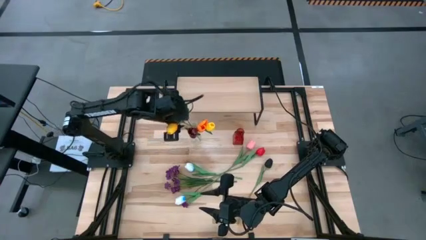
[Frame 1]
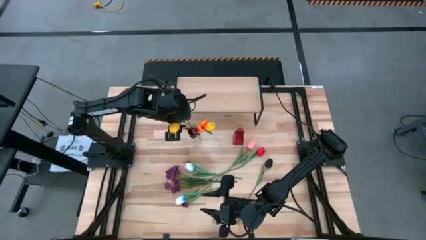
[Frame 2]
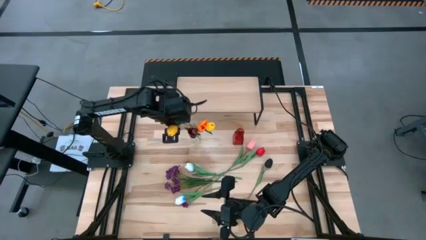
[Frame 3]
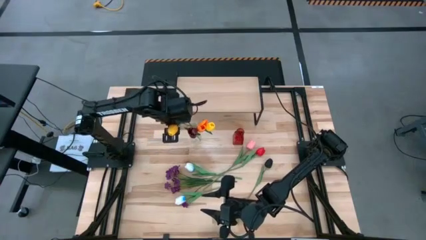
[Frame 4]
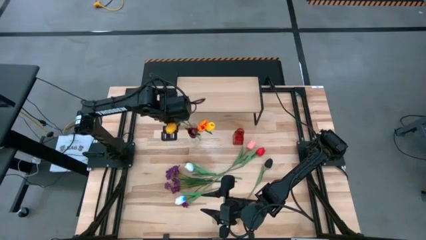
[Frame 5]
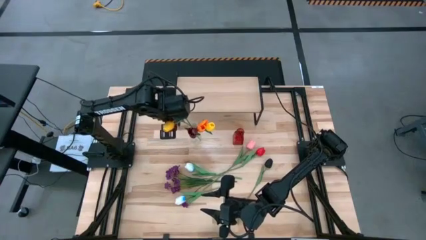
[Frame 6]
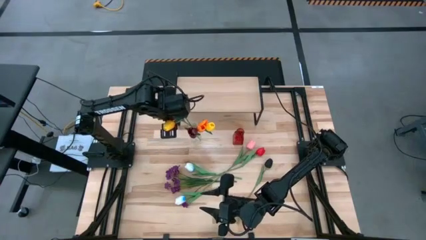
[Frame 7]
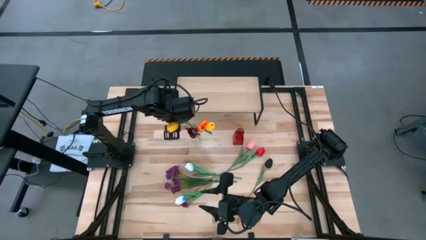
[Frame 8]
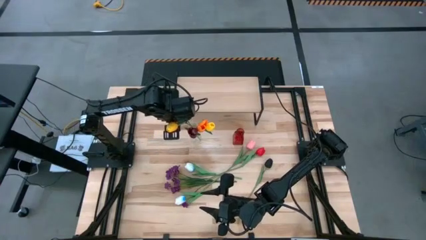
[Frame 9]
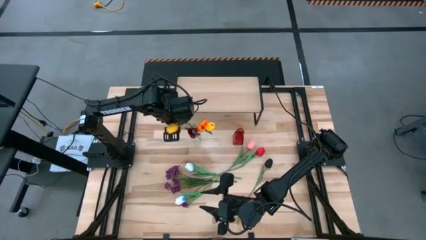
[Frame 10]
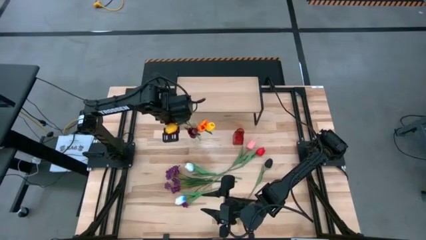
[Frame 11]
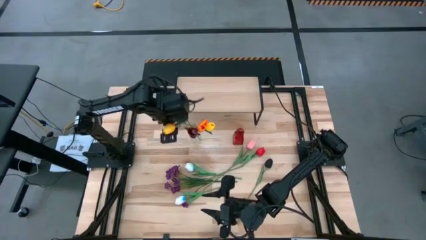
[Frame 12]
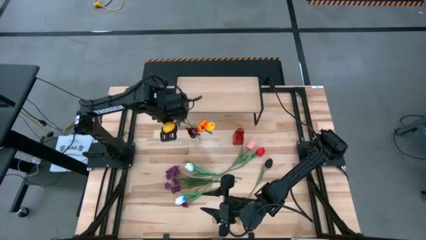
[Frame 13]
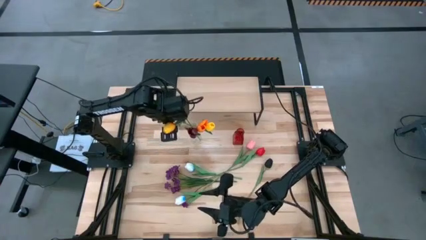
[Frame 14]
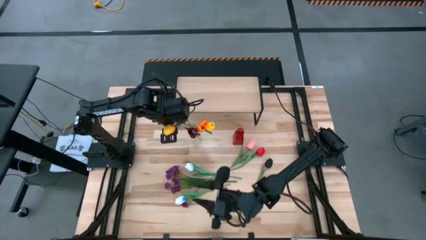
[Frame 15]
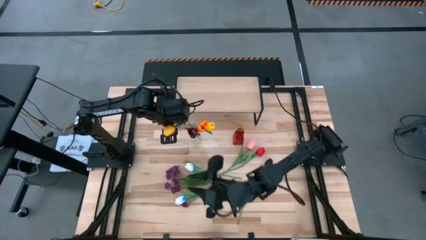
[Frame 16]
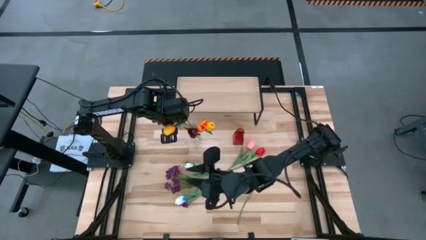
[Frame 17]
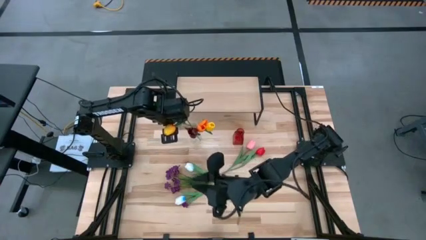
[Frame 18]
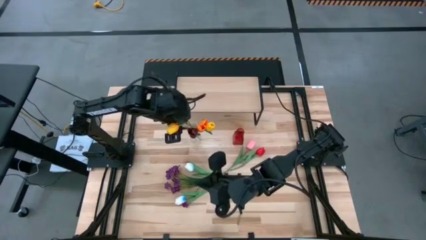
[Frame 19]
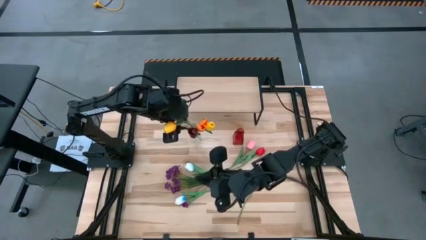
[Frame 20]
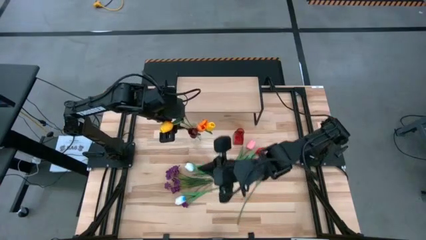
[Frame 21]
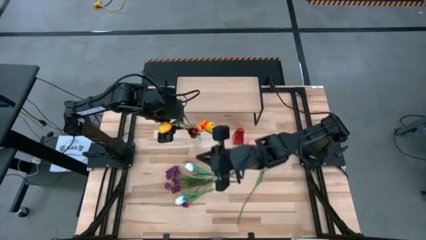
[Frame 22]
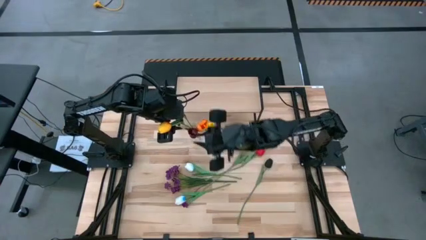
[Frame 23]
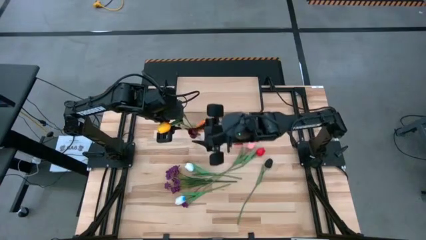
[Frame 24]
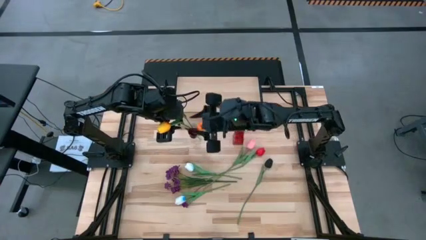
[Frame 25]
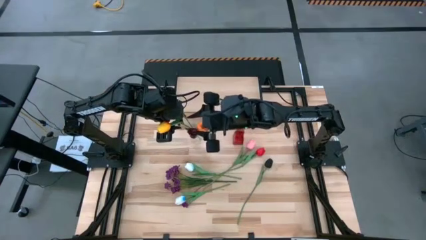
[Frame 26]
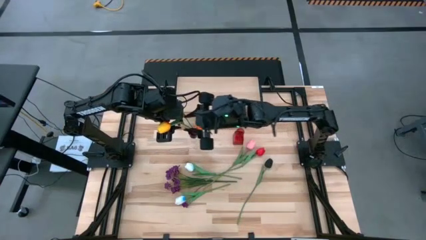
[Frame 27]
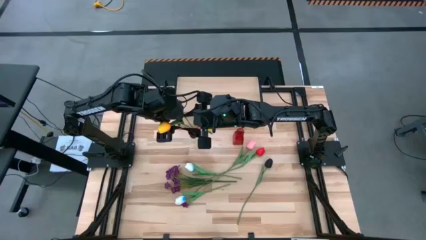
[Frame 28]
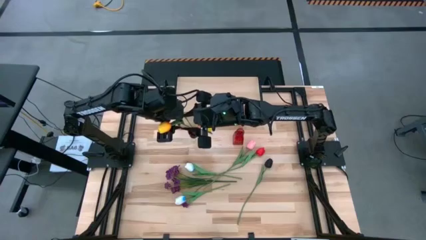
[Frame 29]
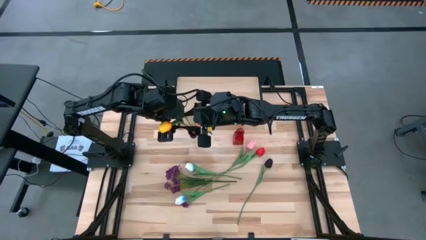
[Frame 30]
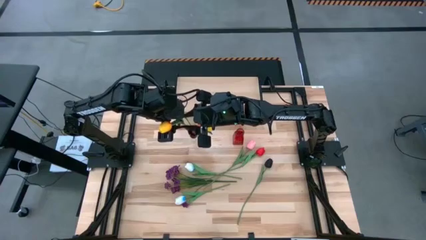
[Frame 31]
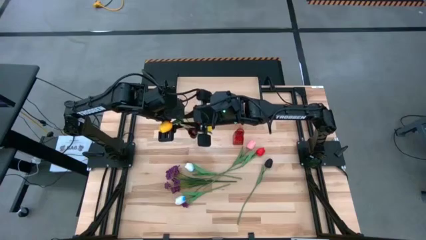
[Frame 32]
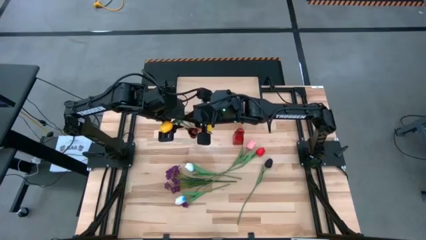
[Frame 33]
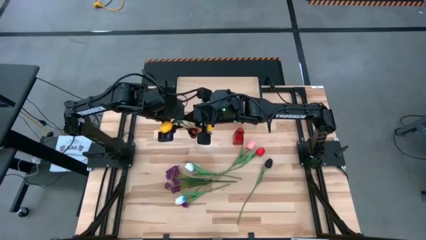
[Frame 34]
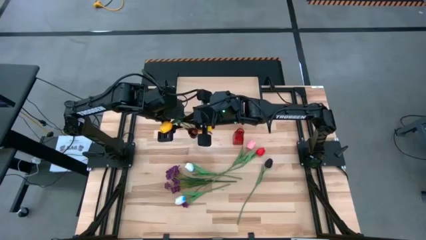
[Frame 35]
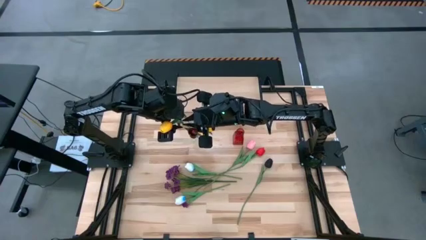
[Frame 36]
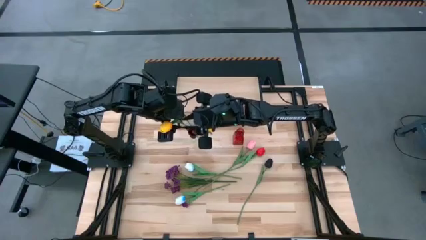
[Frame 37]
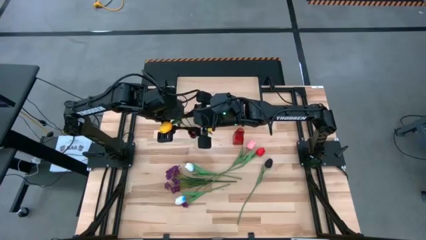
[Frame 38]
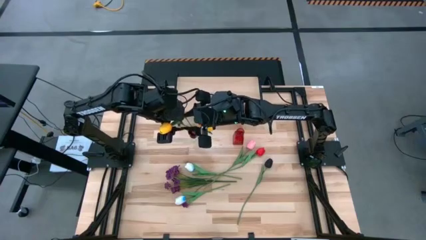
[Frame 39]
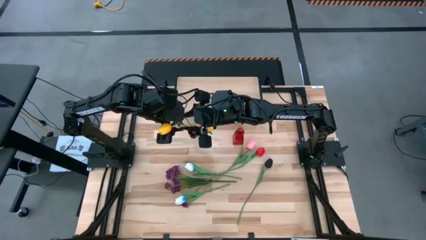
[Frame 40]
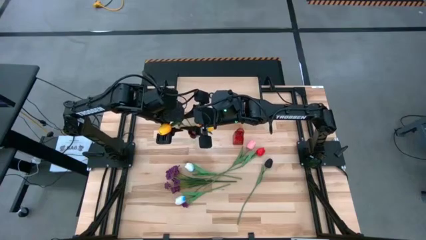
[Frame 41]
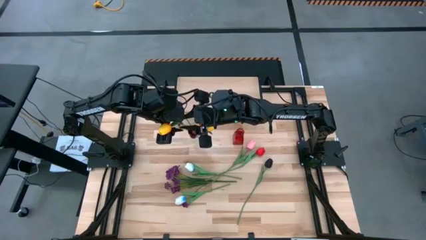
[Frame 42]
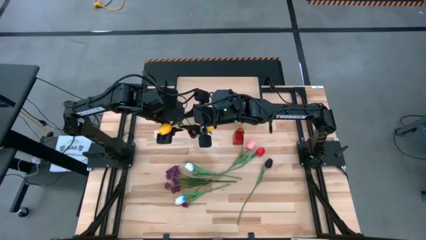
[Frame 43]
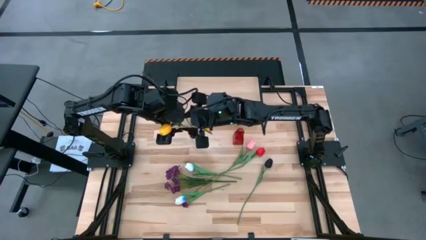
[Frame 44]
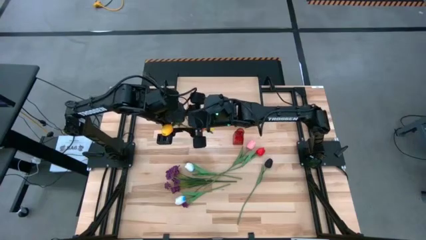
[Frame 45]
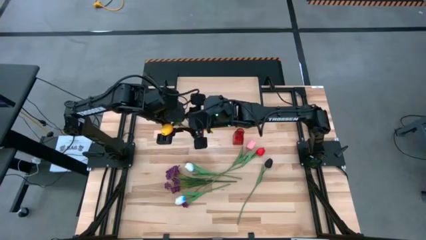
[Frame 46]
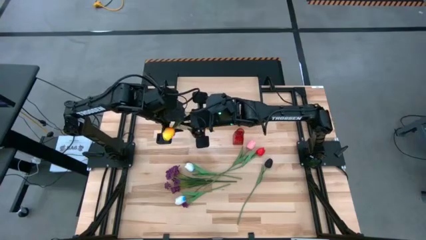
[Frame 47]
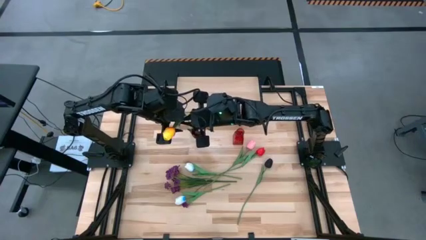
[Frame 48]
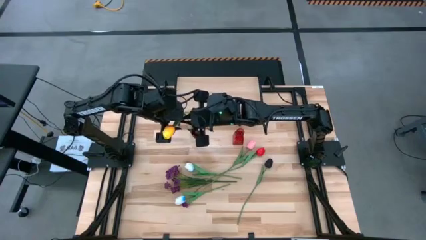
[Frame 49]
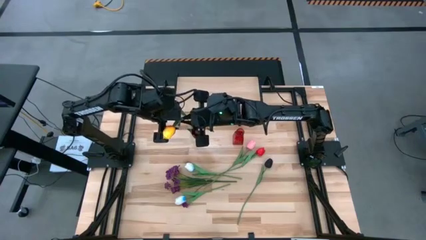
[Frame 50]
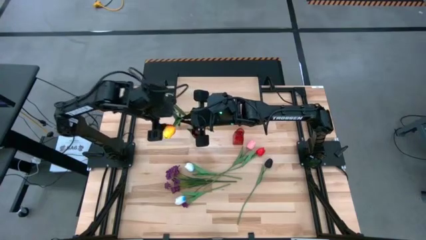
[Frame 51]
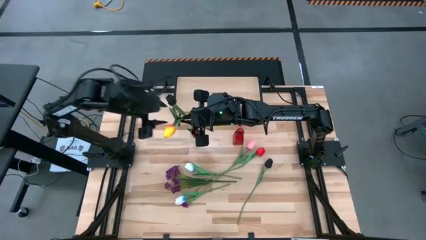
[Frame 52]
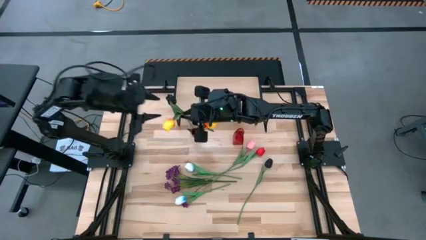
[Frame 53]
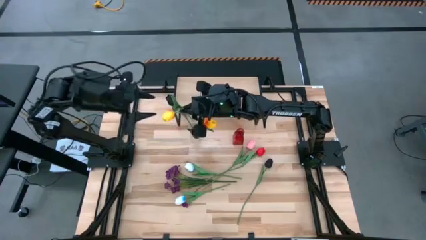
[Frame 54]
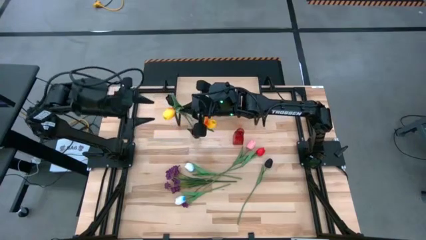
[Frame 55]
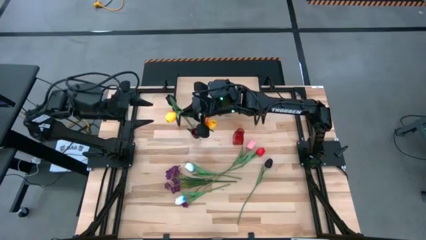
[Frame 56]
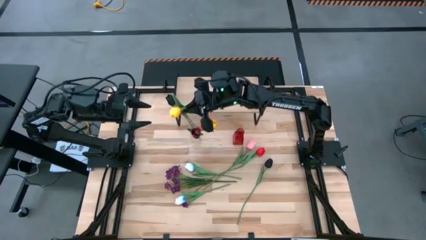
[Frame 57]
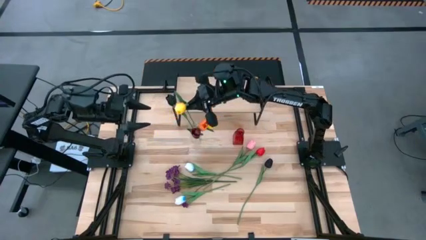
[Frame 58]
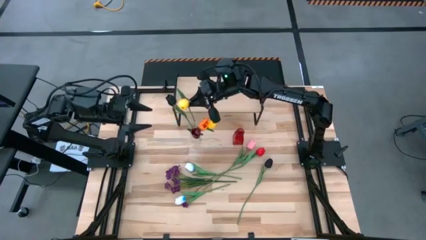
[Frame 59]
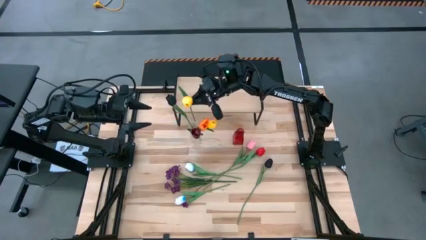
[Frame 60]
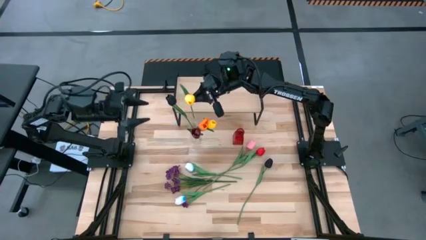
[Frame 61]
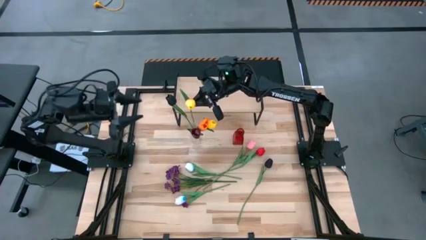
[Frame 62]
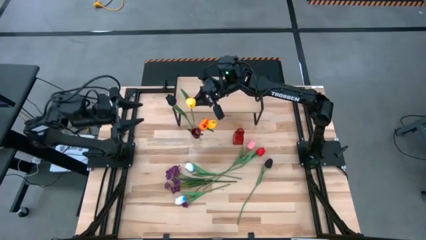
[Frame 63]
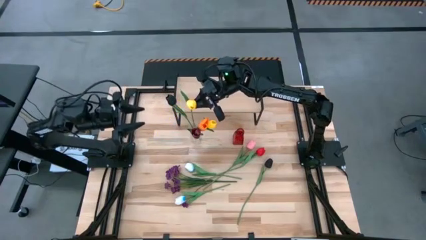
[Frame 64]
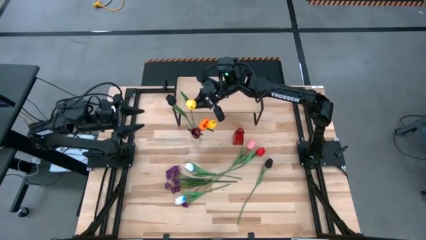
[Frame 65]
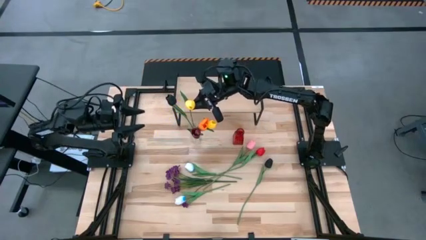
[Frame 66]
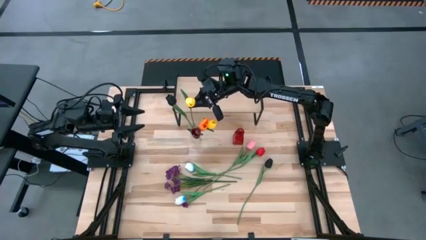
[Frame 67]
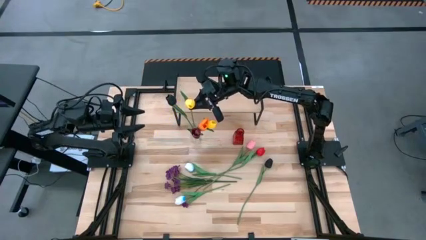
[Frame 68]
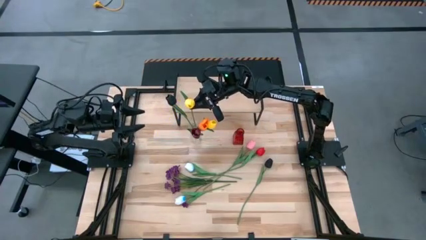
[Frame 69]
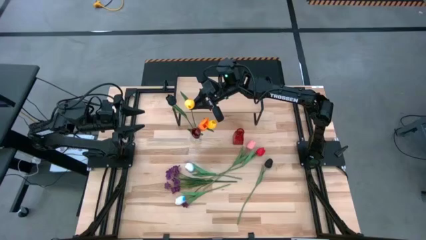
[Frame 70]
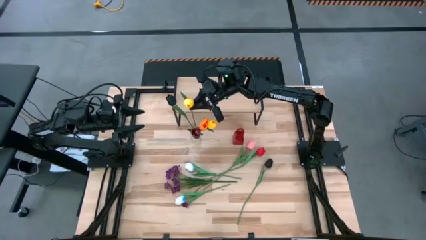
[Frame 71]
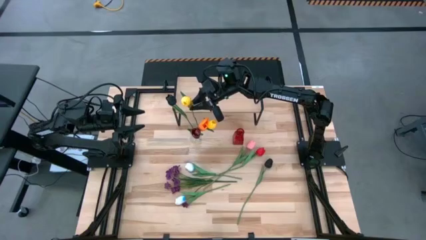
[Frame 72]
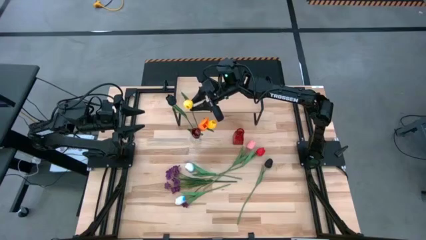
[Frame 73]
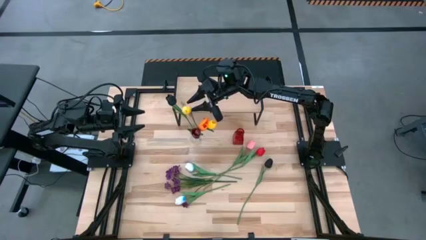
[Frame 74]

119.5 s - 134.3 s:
Task: Pick and place flowers into a vace then onto a shelf
Put the yellow tulip into the transparent vase

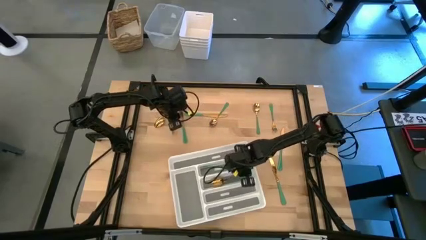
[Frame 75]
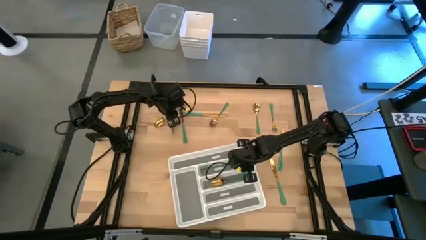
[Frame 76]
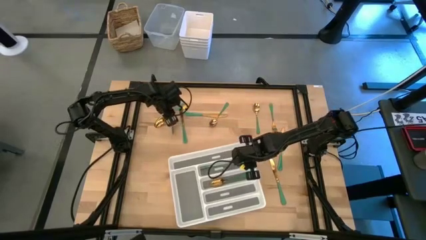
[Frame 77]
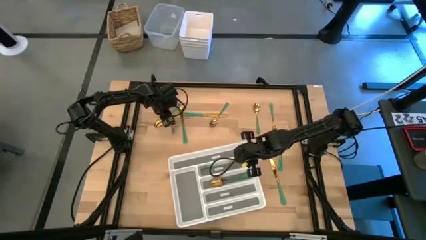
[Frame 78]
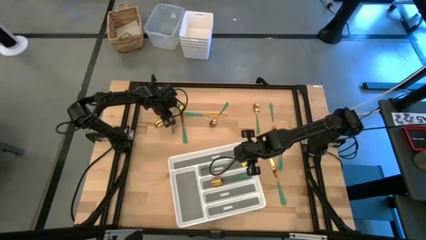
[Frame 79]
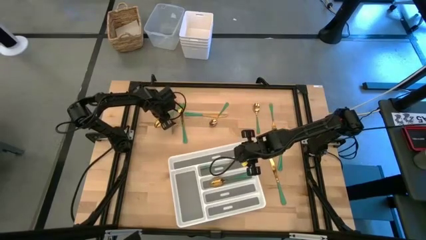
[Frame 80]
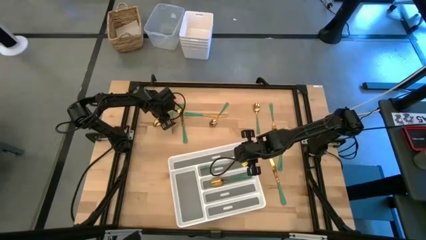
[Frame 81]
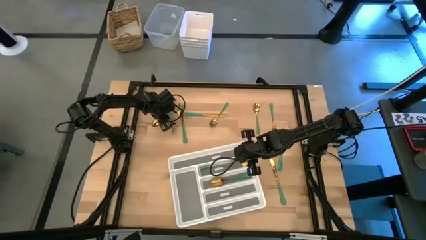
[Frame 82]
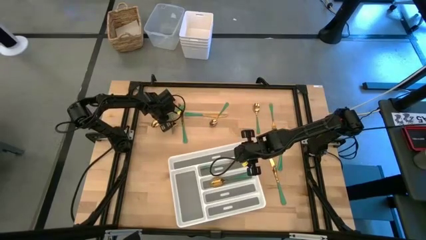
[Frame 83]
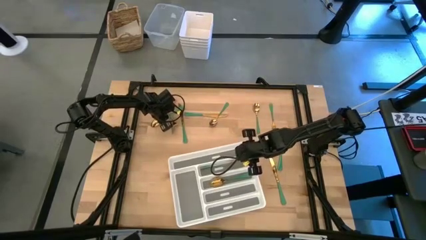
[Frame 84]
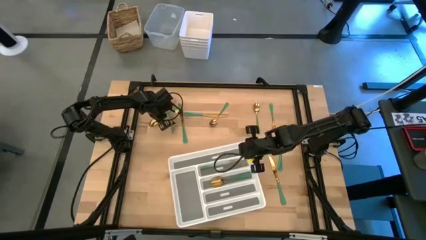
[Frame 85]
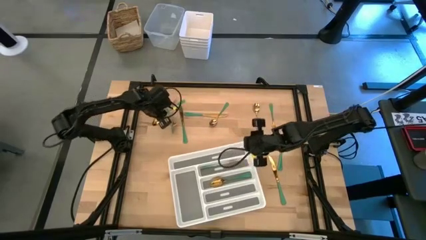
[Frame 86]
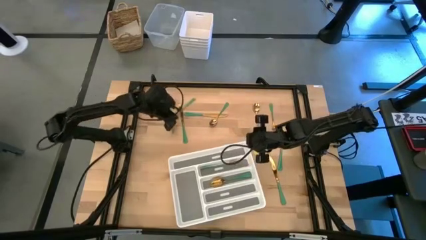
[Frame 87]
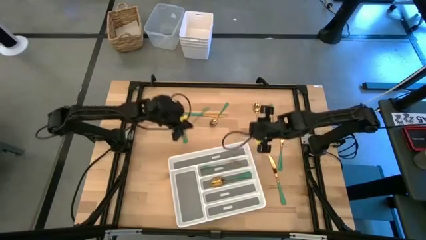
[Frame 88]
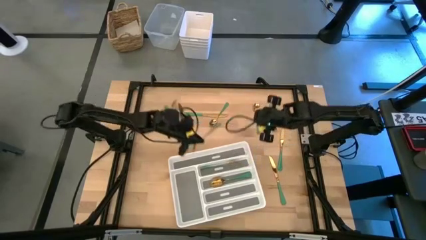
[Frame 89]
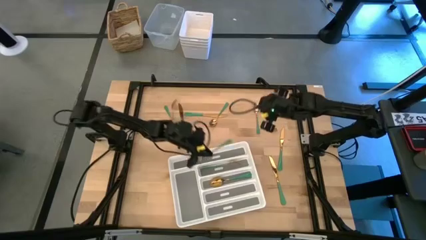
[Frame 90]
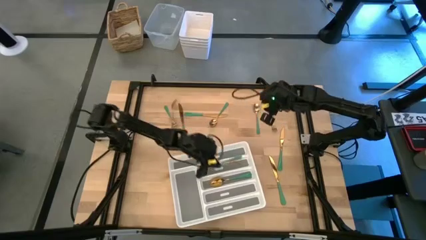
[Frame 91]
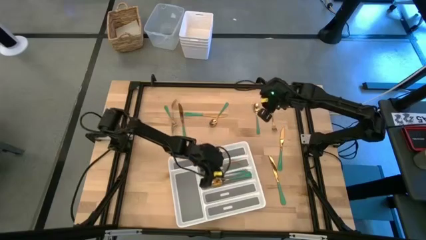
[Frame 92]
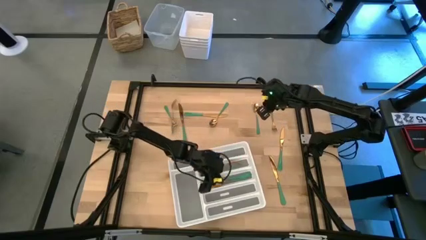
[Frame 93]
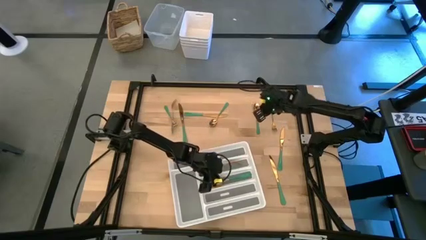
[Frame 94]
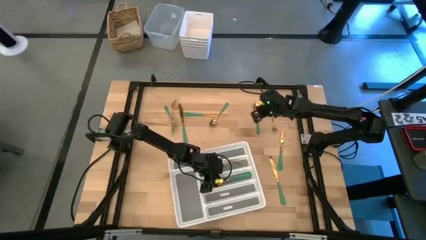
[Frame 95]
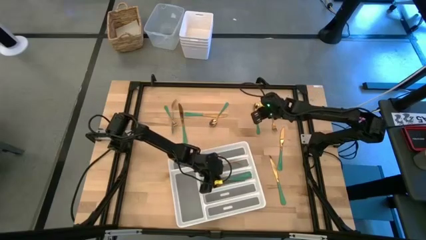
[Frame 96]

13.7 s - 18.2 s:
Task: Sort silverware
Put the green spoon into the white silverware tray
